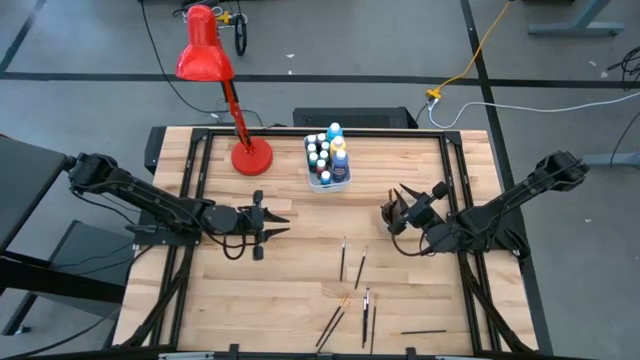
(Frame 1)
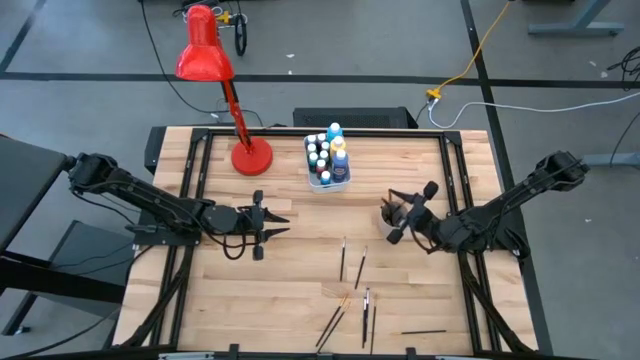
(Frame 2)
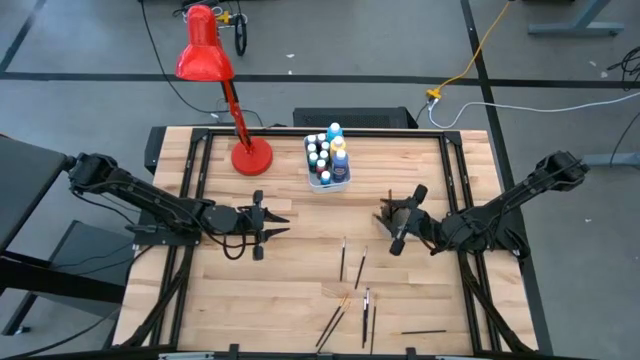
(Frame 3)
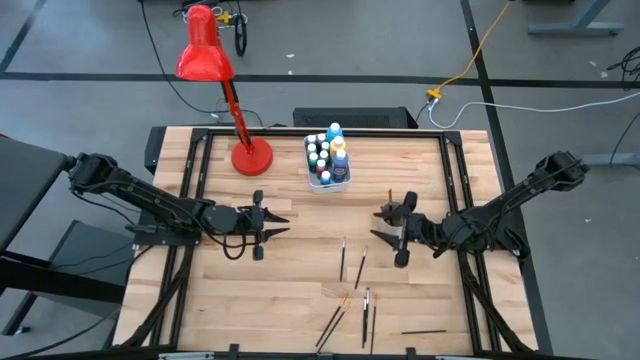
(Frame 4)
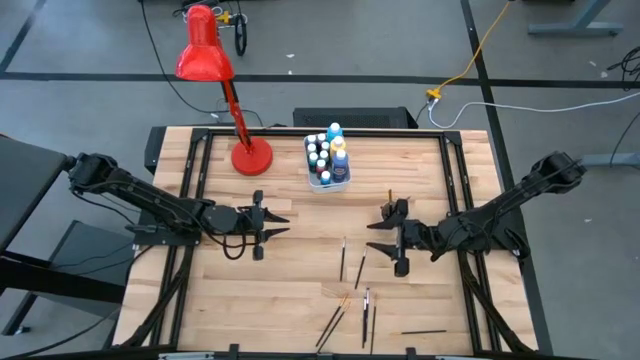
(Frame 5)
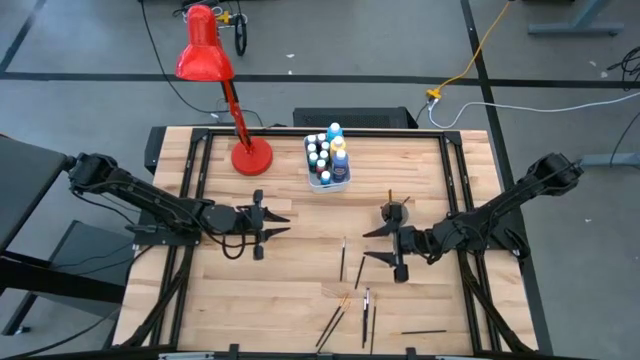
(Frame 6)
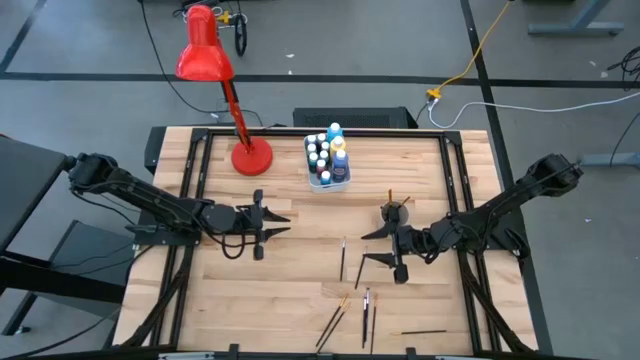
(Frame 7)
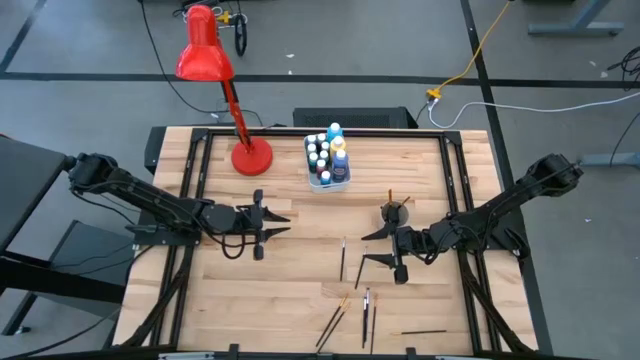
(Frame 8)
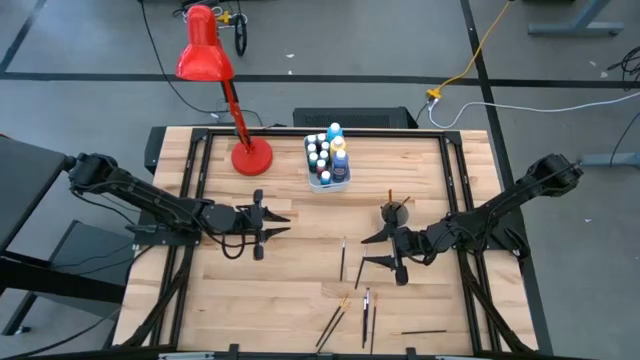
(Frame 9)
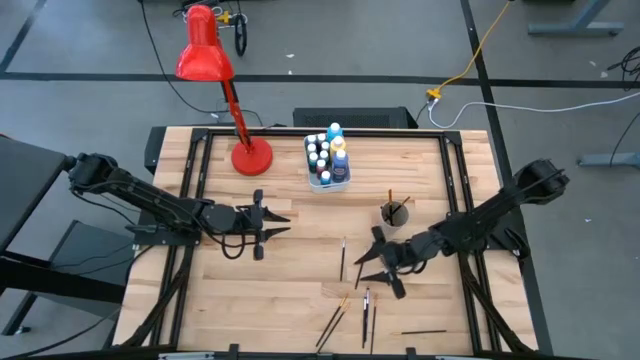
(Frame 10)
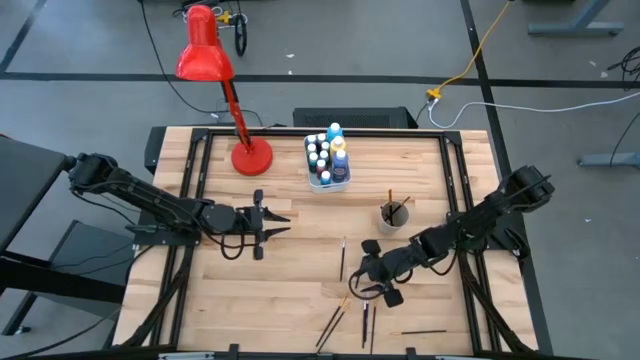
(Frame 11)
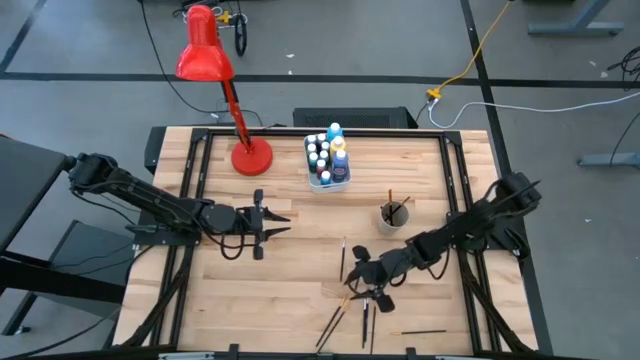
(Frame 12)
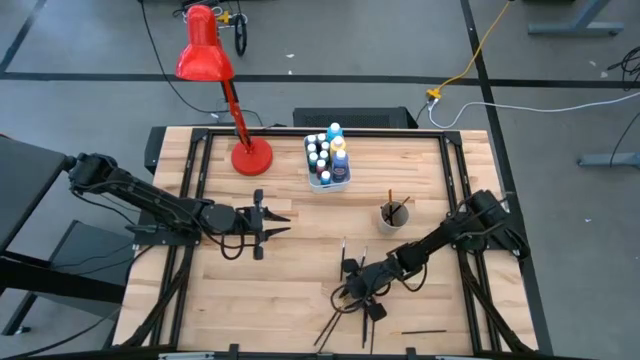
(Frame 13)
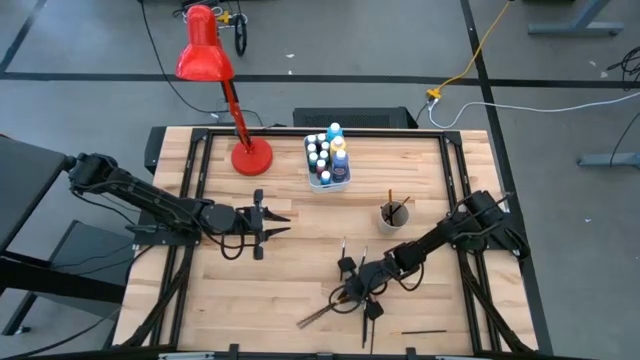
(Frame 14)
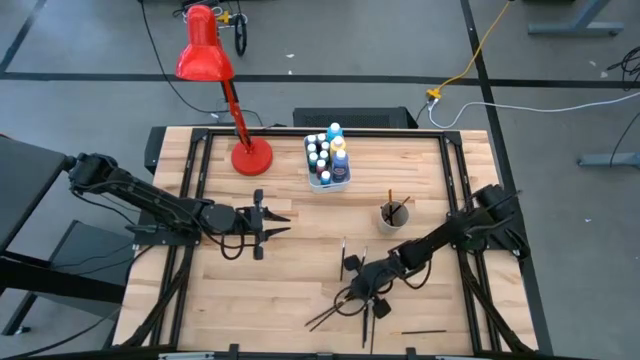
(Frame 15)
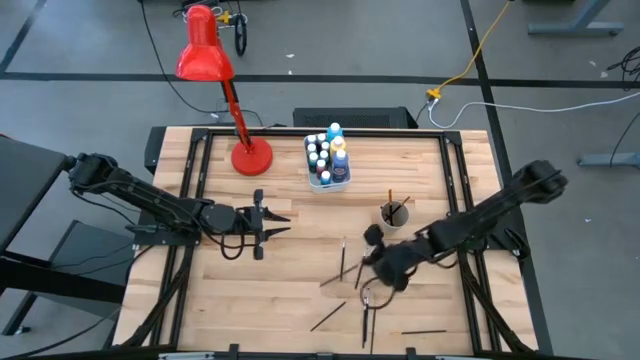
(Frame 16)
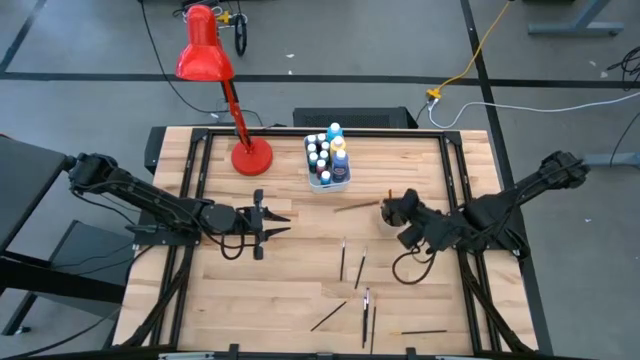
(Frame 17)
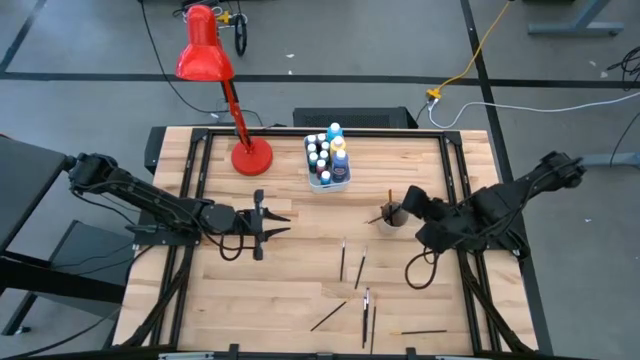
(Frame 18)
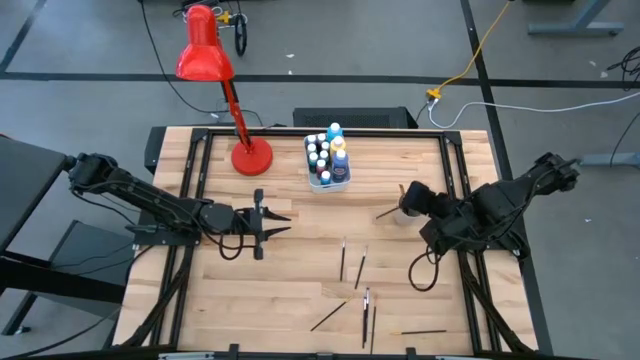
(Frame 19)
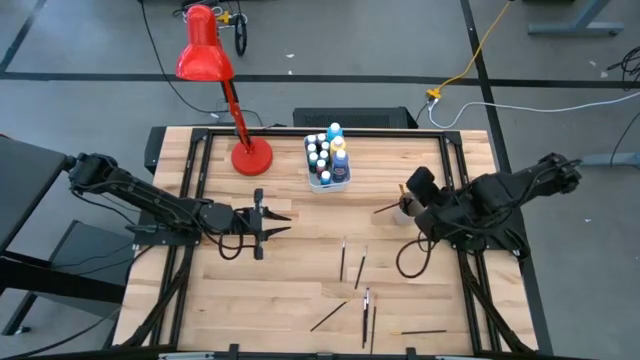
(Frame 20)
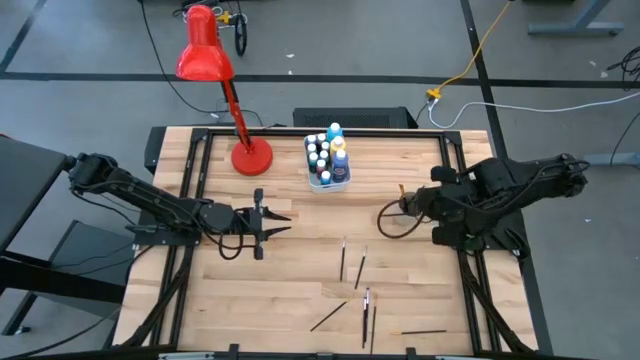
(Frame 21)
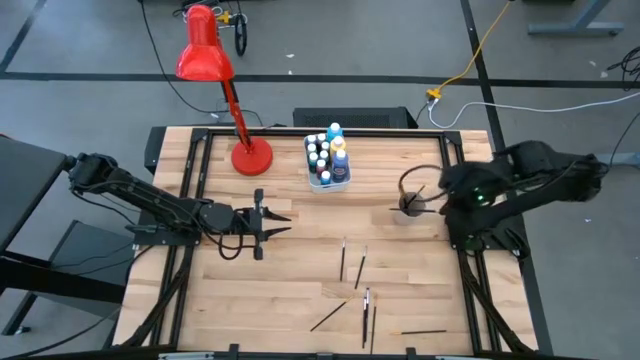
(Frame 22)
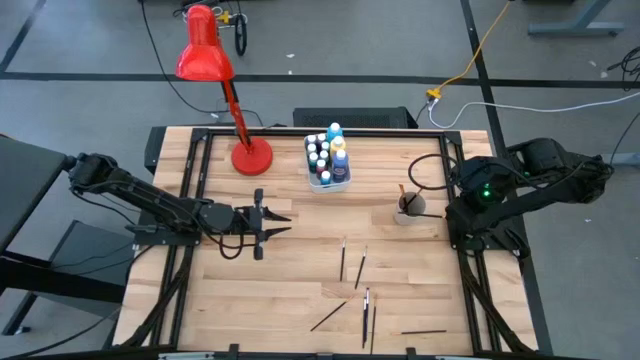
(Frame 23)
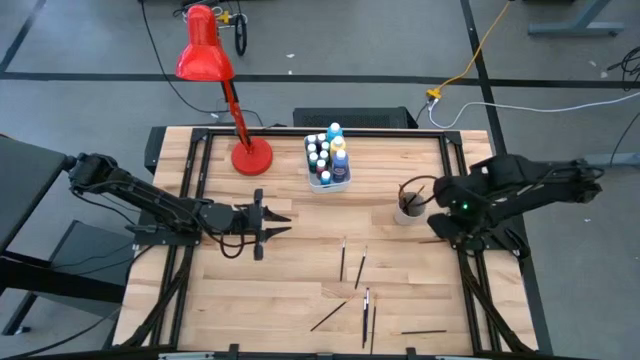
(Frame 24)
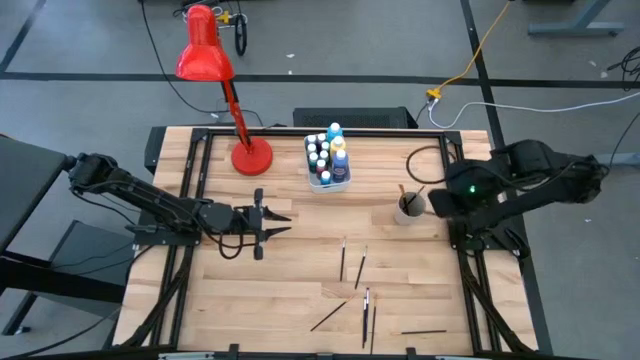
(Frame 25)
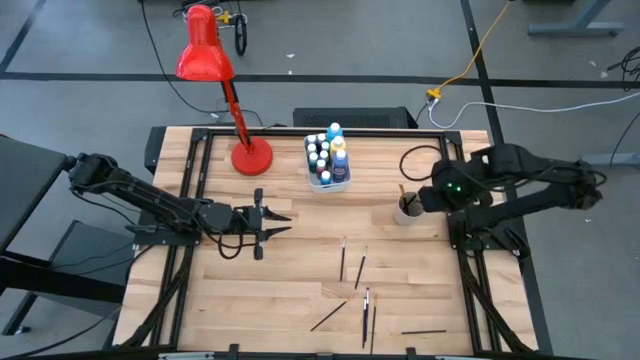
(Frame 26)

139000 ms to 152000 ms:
Task: Pick & Place Paint Supplies
Put the gold paint brush into the gray cup

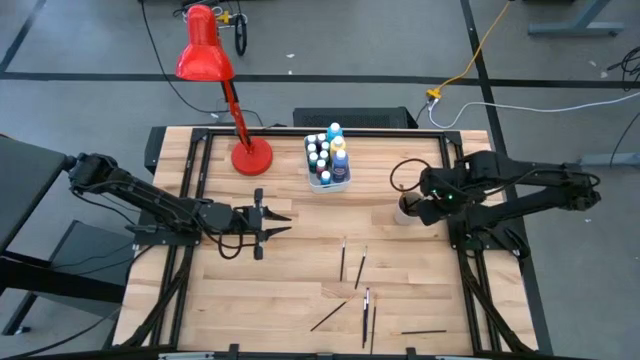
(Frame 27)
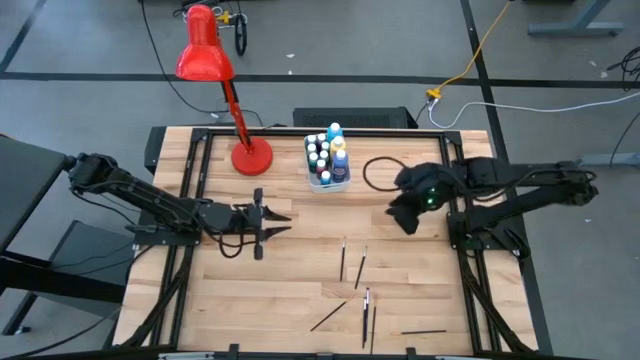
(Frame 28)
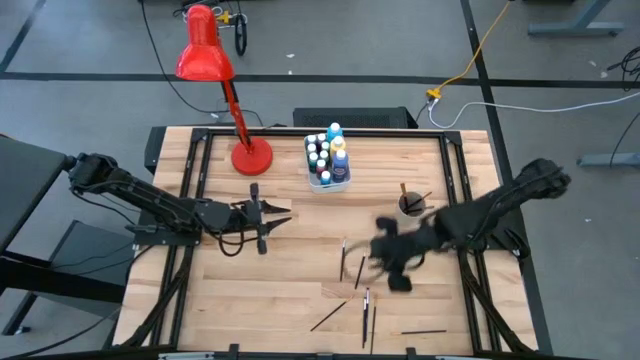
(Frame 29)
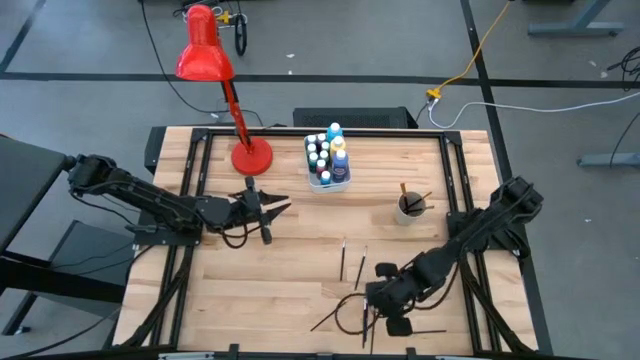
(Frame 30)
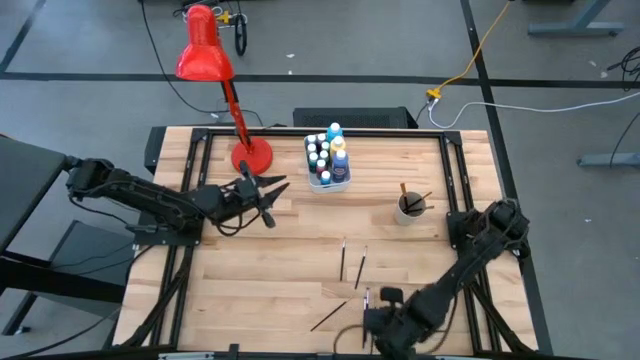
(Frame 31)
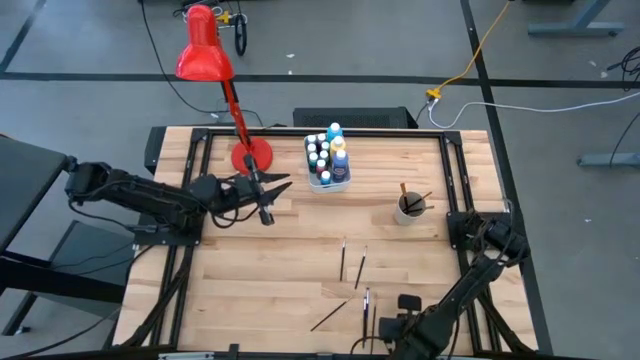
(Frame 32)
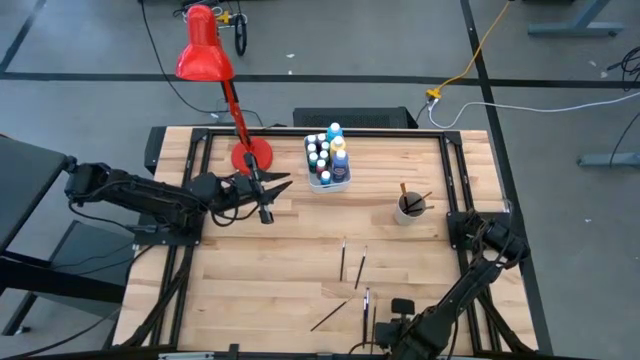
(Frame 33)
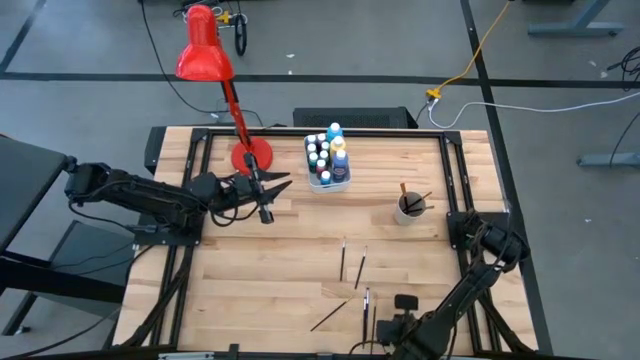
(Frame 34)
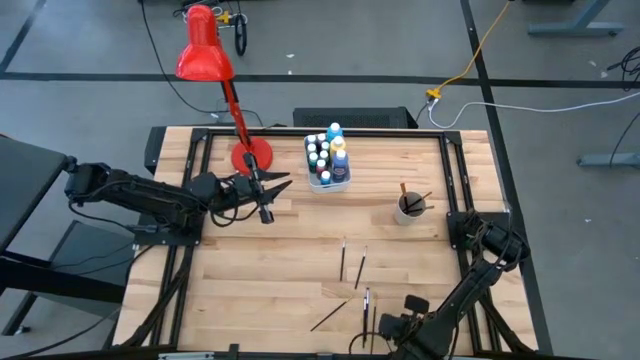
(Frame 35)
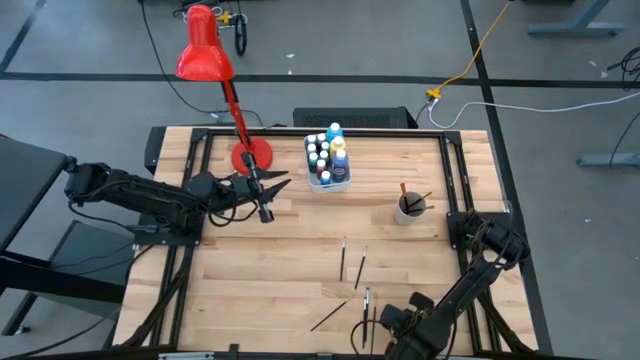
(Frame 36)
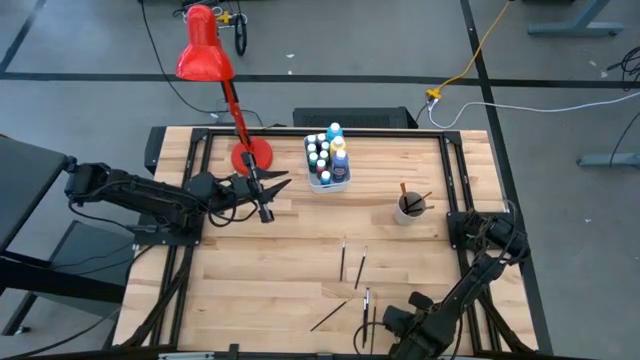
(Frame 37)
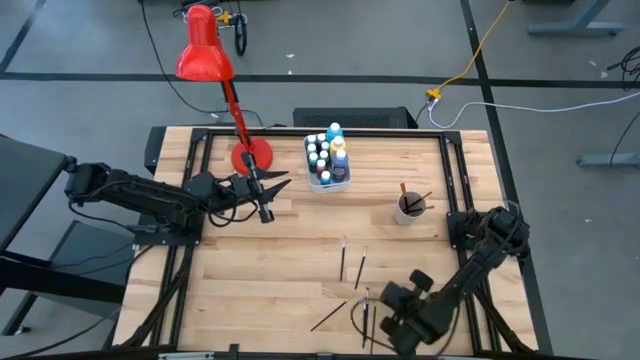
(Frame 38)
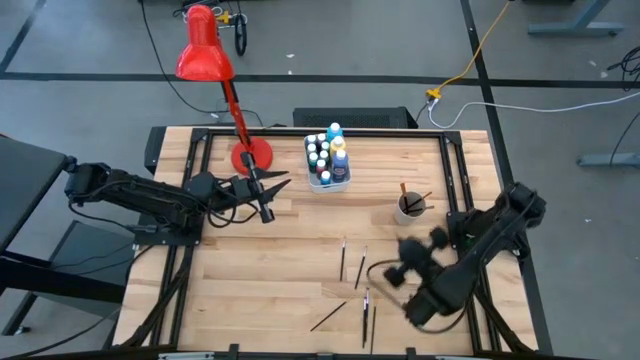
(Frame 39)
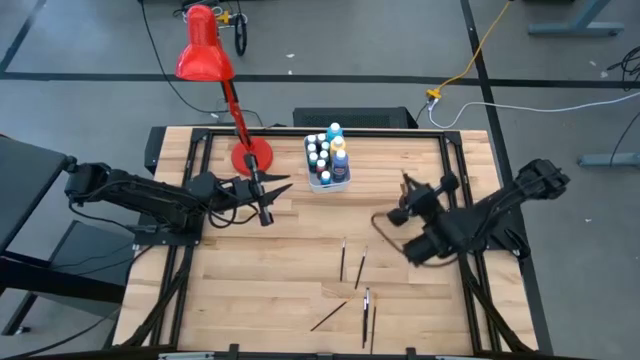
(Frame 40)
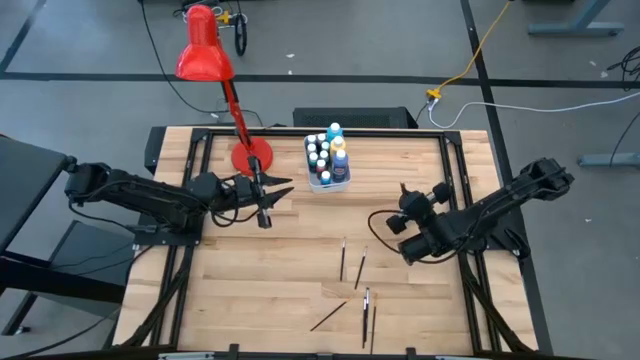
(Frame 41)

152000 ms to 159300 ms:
Put the gold paint brush into the gray cup
